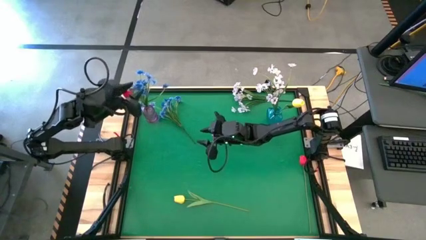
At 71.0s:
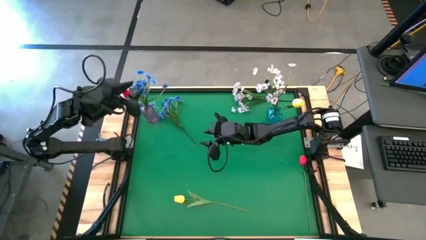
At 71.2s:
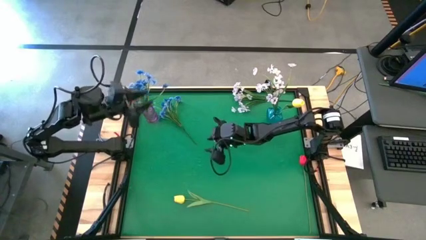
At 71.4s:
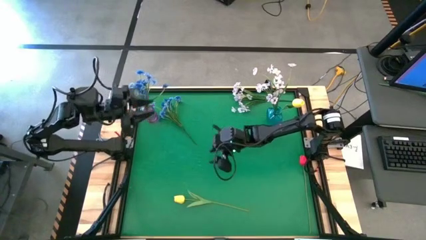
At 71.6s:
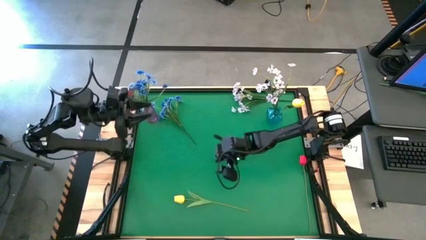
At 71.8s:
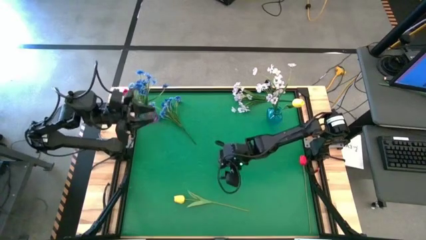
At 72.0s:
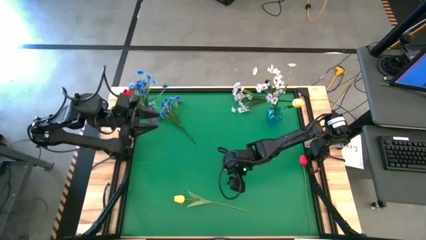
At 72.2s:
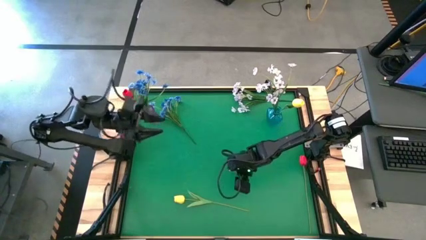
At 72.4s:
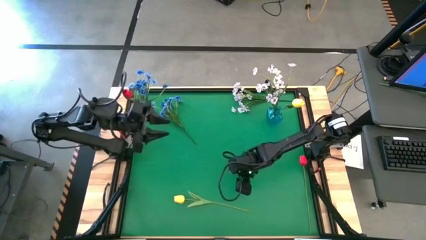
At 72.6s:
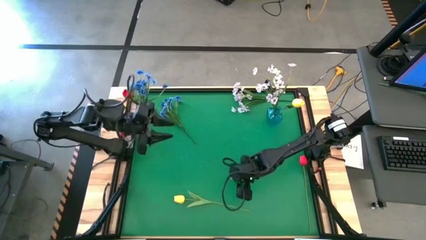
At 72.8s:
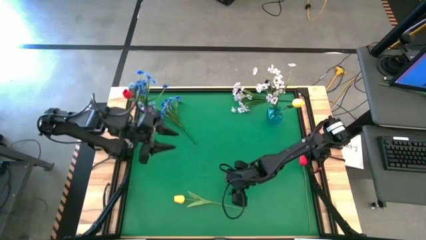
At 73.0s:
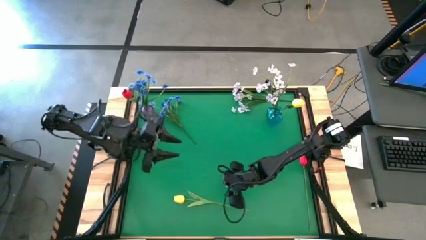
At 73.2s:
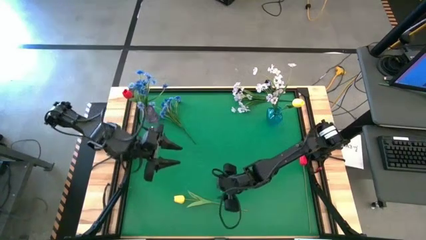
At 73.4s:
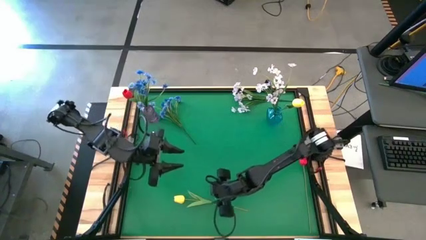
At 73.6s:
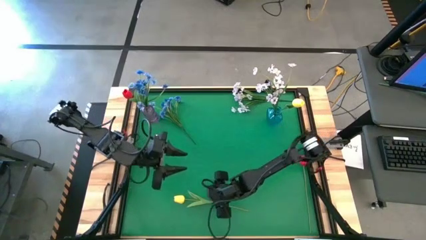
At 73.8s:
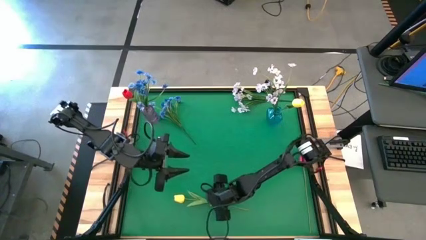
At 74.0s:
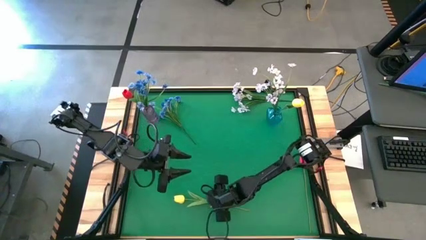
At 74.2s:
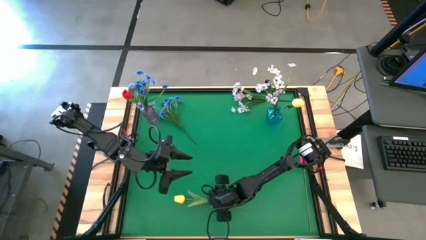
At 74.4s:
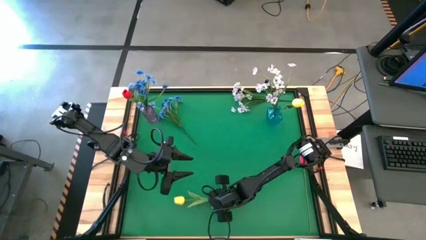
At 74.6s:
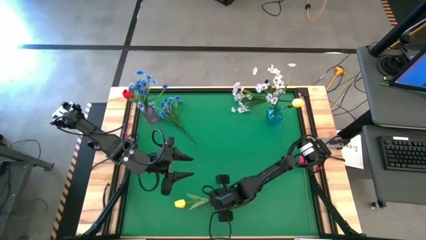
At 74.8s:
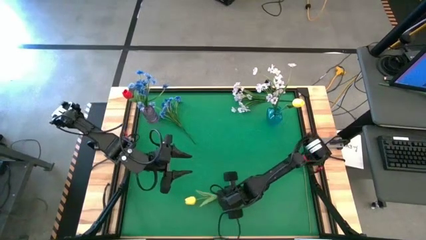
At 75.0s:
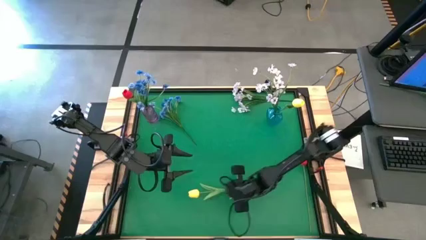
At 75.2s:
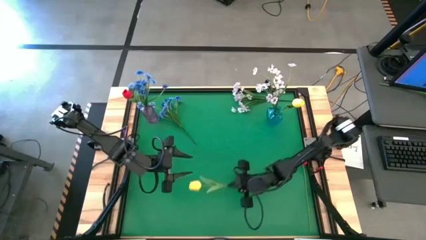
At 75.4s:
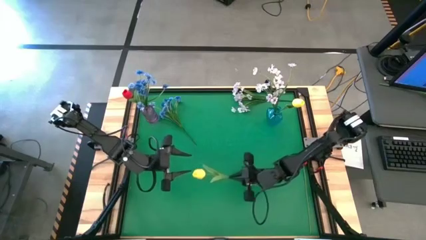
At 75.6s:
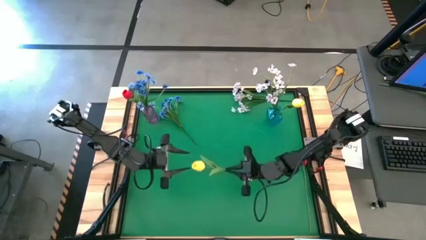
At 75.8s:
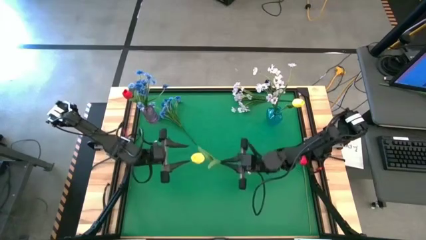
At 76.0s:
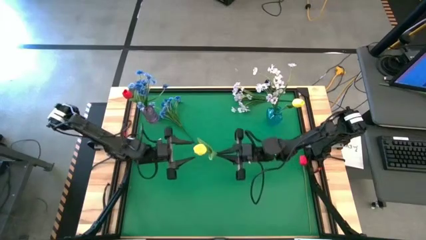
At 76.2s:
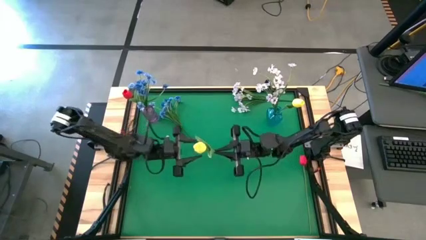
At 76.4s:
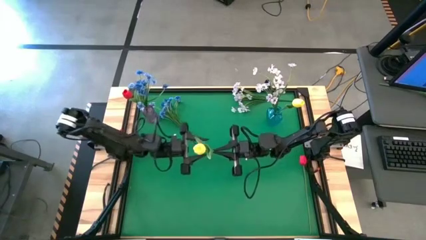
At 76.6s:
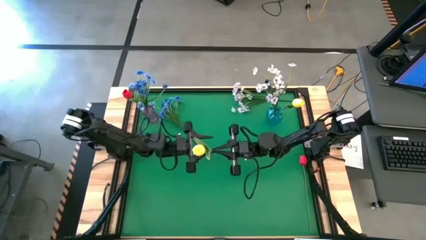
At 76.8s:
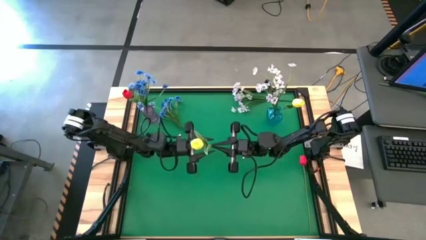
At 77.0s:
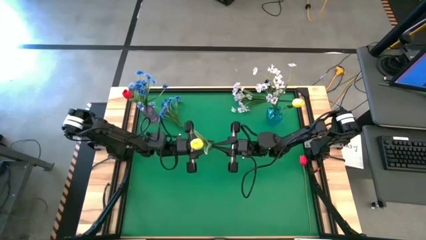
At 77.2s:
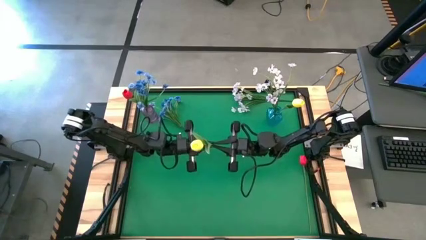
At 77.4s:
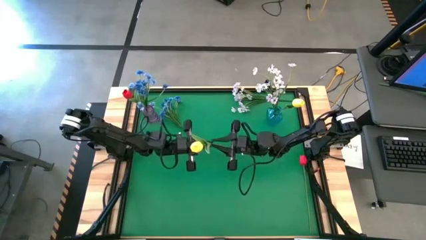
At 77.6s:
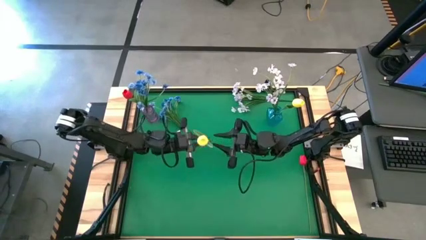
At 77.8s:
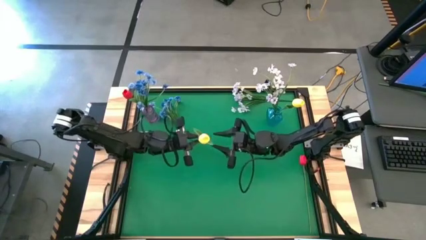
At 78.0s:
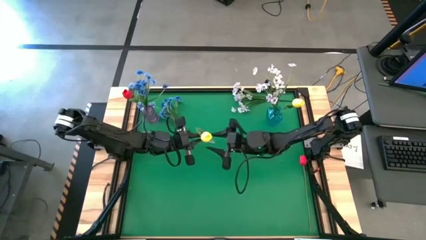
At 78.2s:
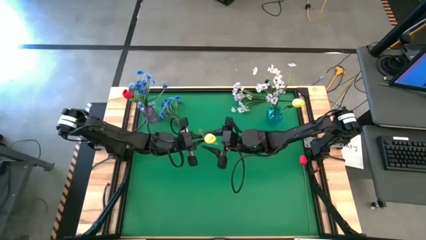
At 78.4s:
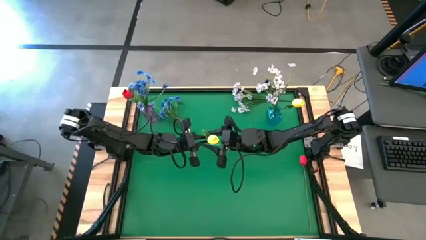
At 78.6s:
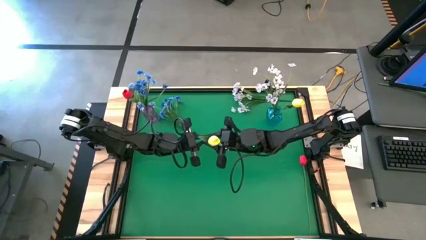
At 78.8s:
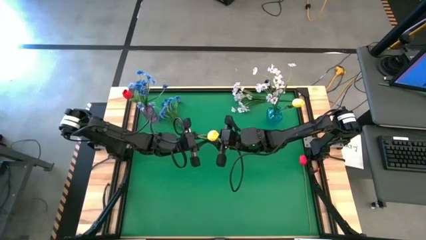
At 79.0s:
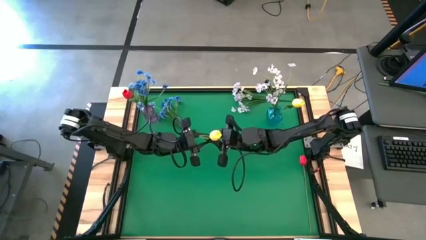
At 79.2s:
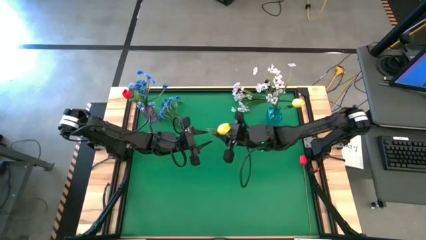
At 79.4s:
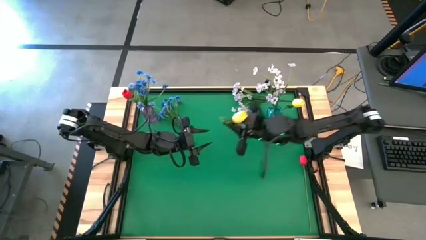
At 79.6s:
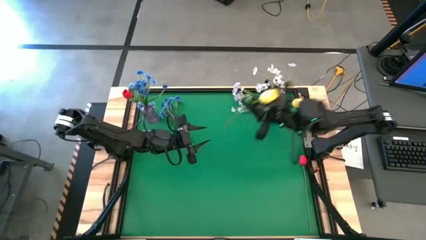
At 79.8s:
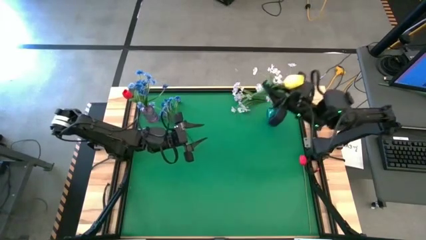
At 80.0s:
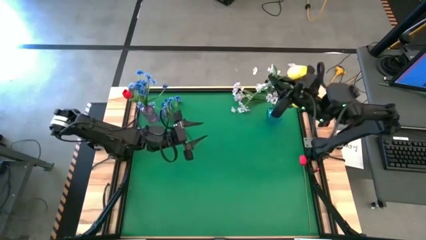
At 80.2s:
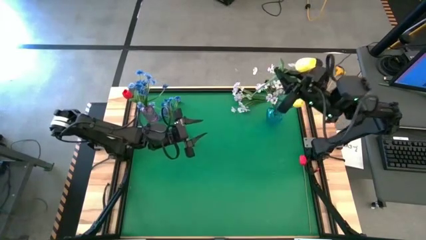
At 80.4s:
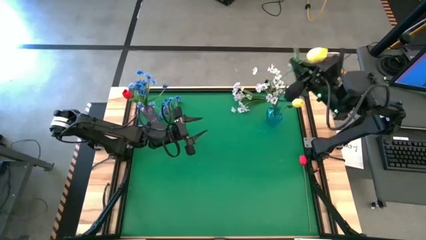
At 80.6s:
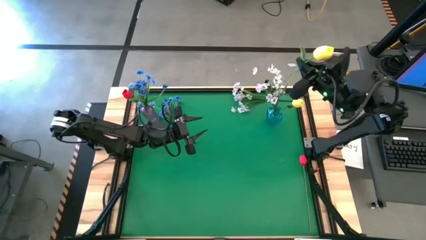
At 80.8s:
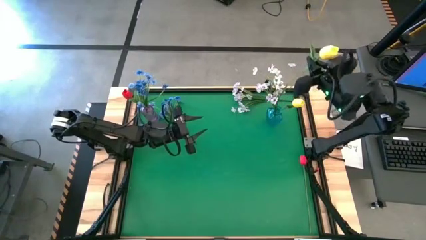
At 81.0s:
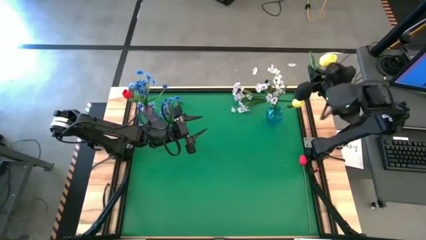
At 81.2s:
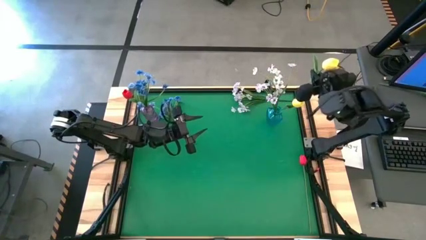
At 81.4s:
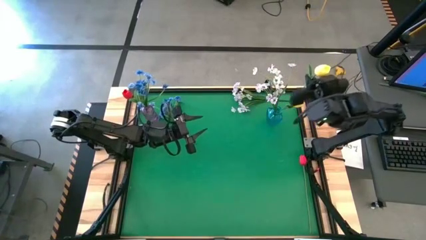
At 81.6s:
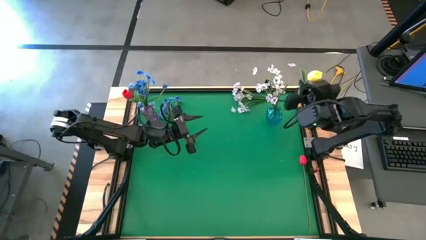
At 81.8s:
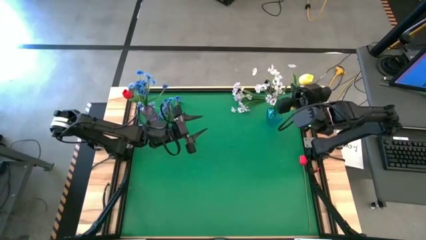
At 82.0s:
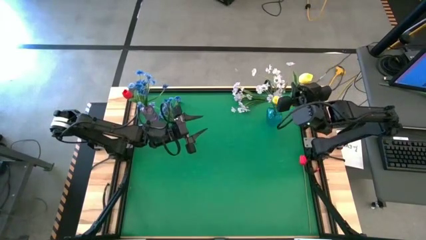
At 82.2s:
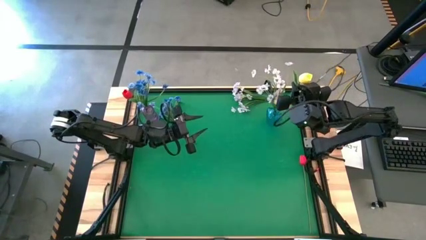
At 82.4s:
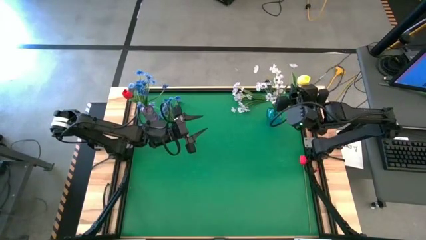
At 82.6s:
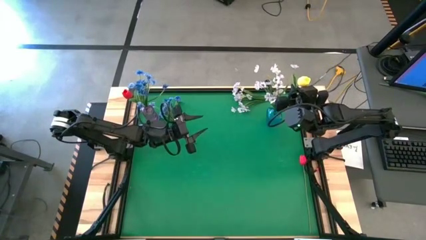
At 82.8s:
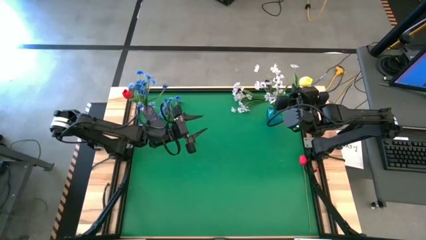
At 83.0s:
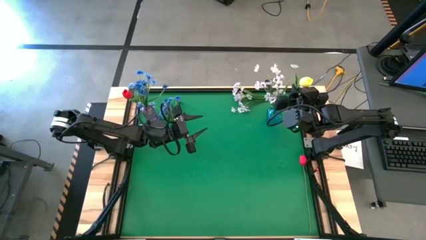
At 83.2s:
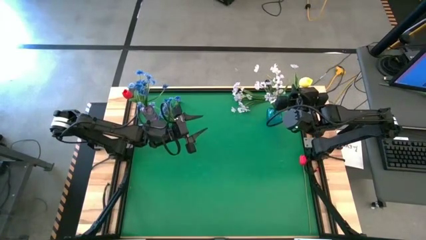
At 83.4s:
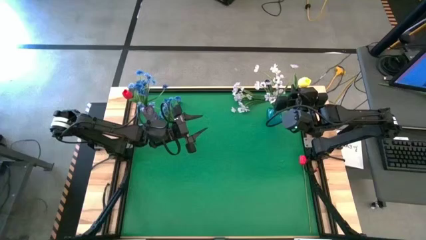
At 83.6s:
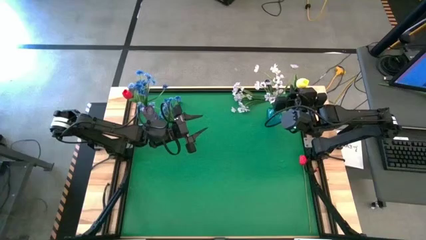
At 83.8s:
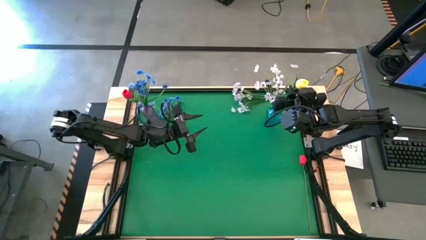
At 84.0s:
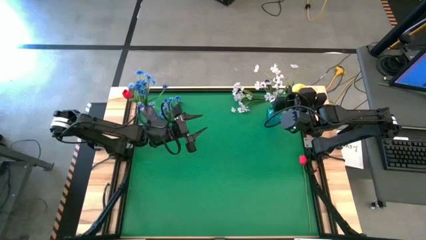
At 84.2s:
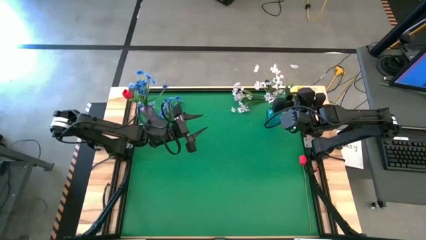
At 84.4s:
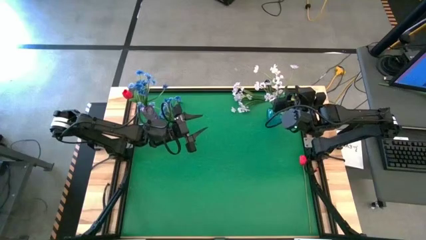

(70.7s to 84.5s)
Task: Sort flowers into vase by color
Put the yellow tulip into the blue vase
